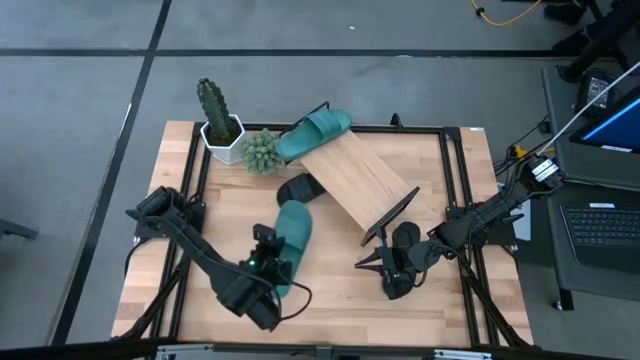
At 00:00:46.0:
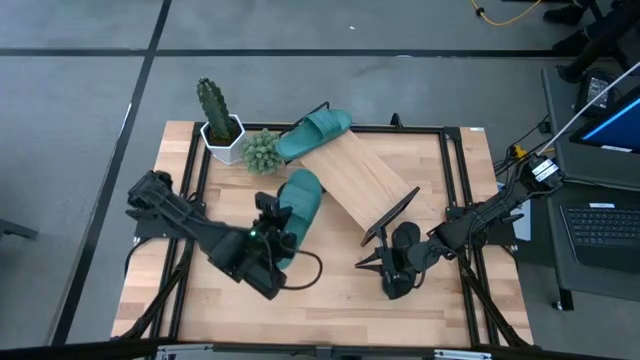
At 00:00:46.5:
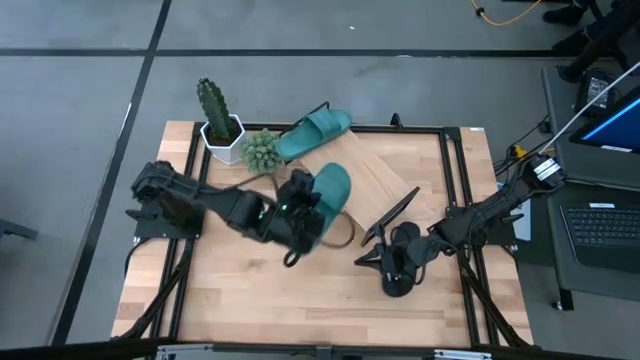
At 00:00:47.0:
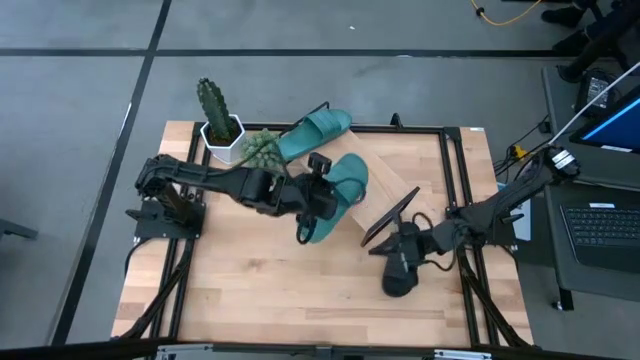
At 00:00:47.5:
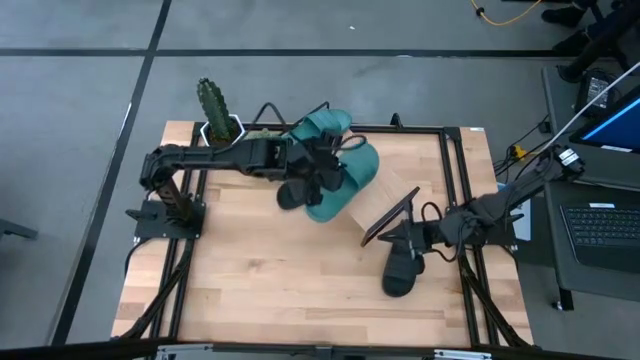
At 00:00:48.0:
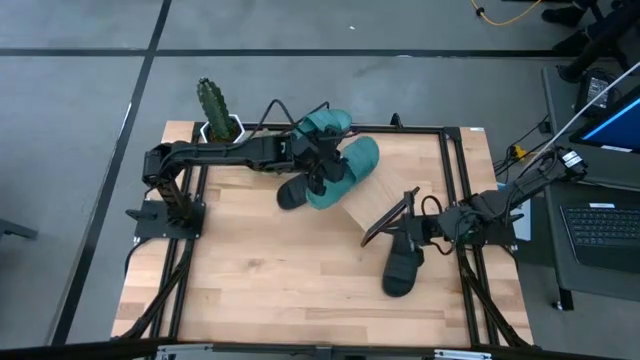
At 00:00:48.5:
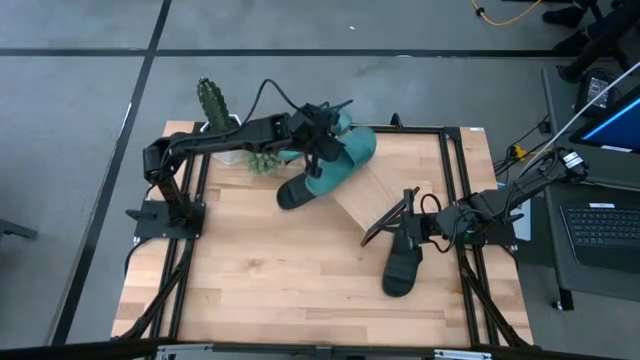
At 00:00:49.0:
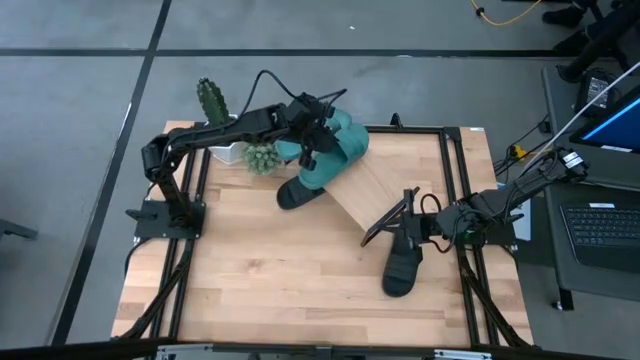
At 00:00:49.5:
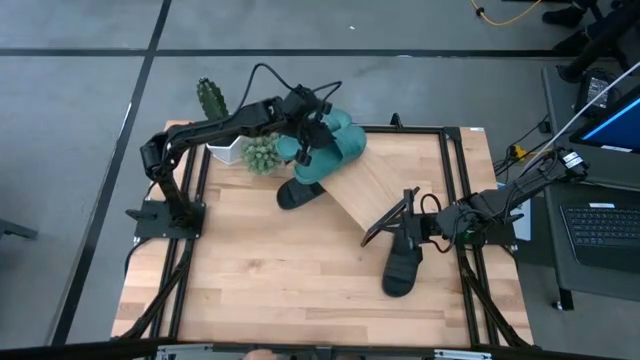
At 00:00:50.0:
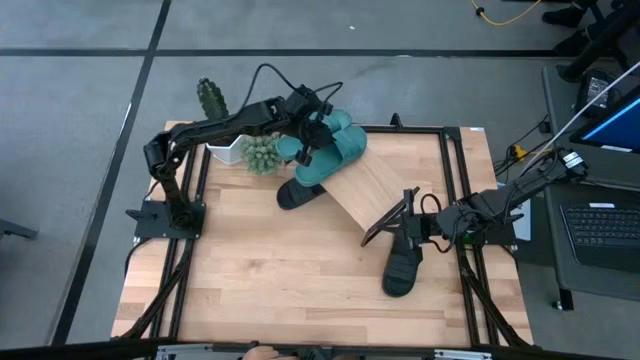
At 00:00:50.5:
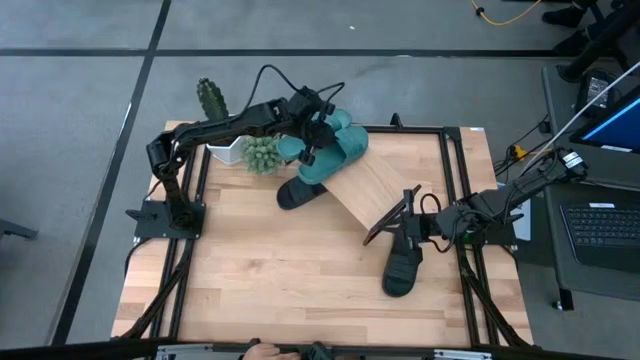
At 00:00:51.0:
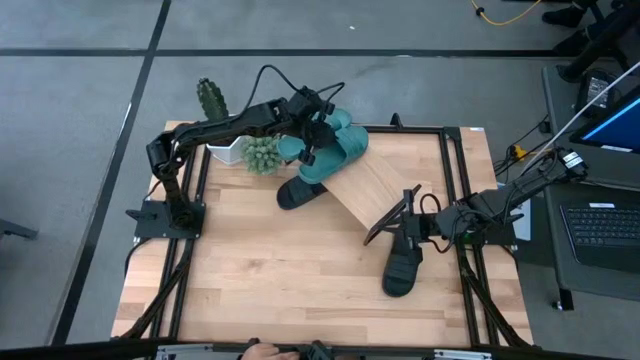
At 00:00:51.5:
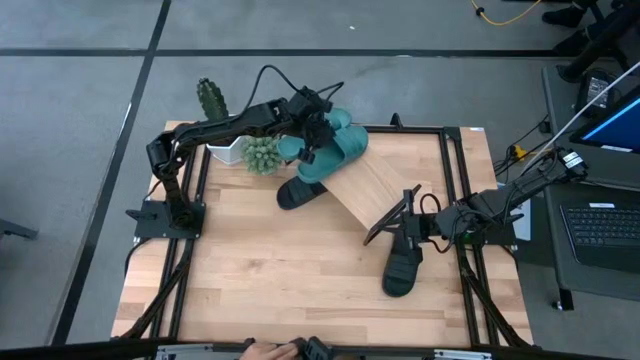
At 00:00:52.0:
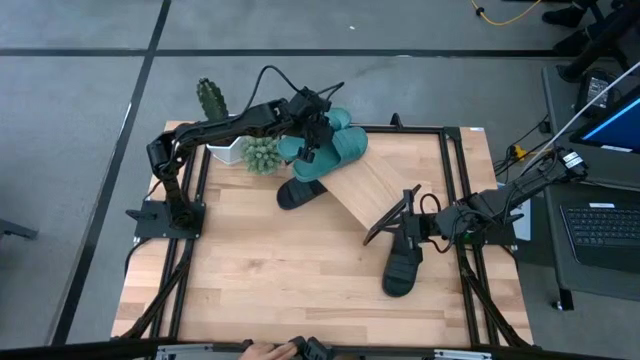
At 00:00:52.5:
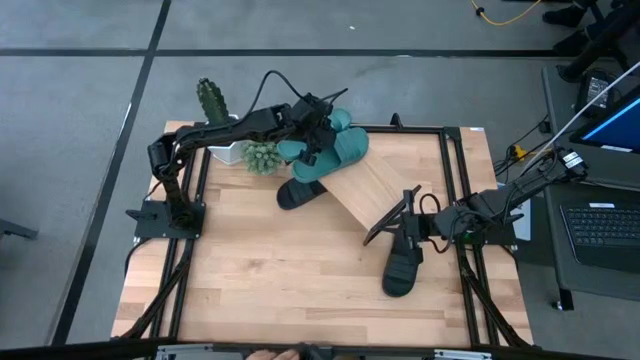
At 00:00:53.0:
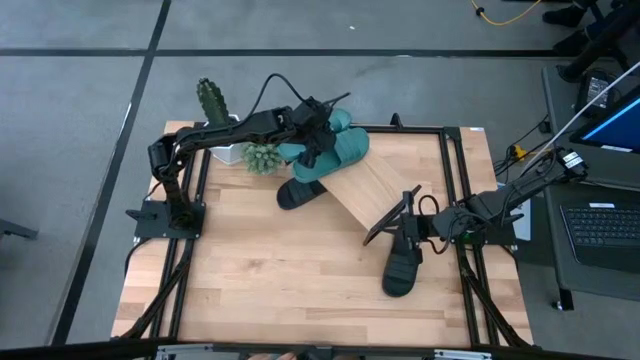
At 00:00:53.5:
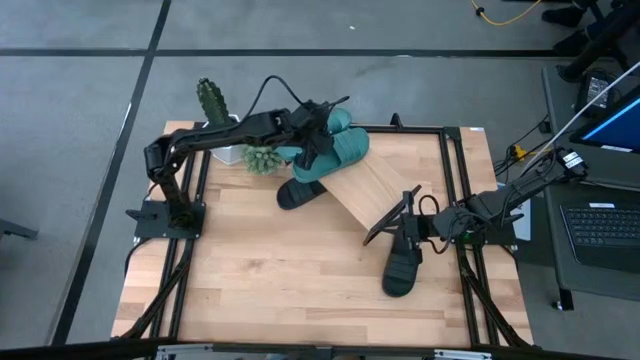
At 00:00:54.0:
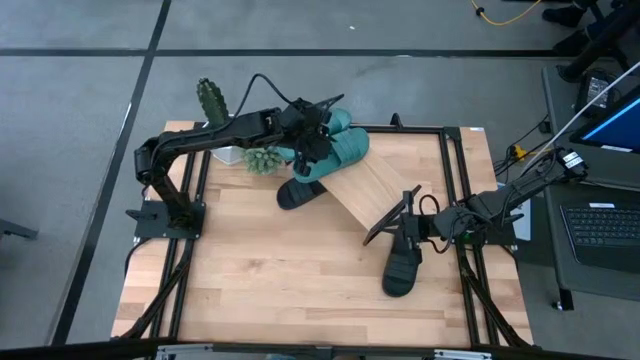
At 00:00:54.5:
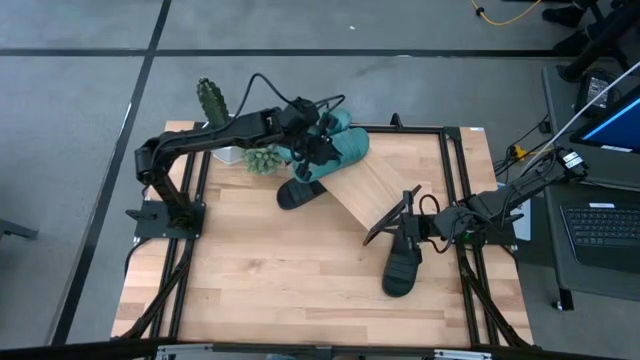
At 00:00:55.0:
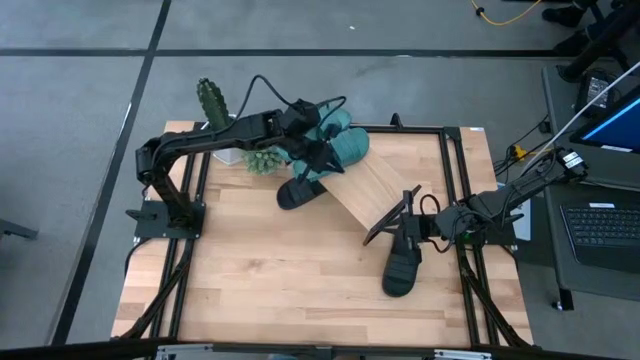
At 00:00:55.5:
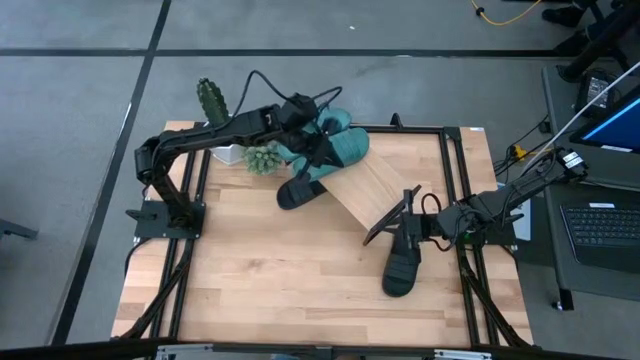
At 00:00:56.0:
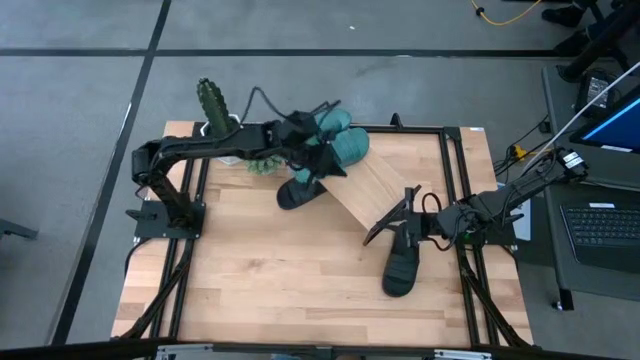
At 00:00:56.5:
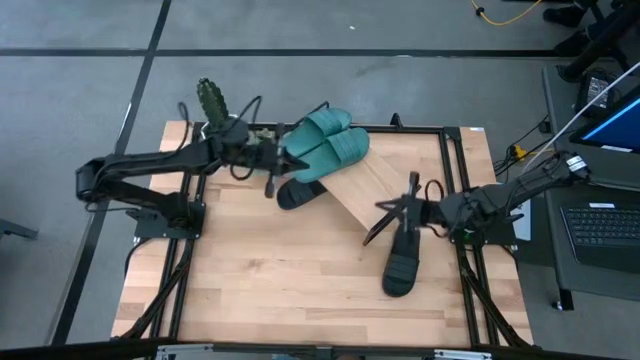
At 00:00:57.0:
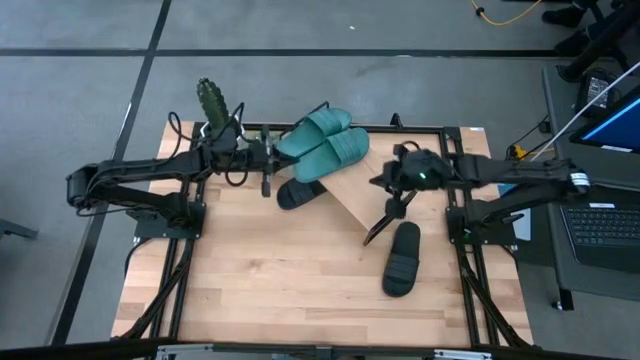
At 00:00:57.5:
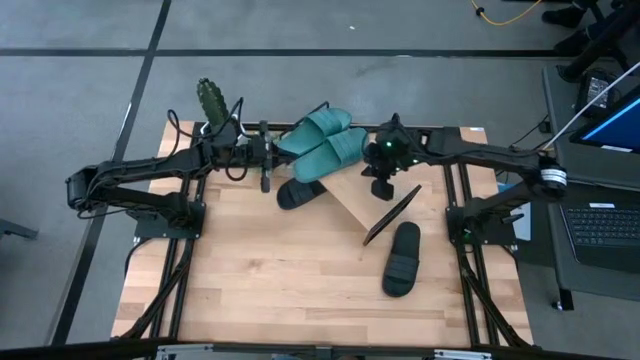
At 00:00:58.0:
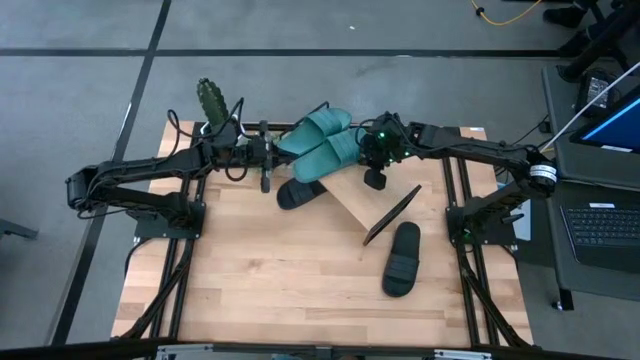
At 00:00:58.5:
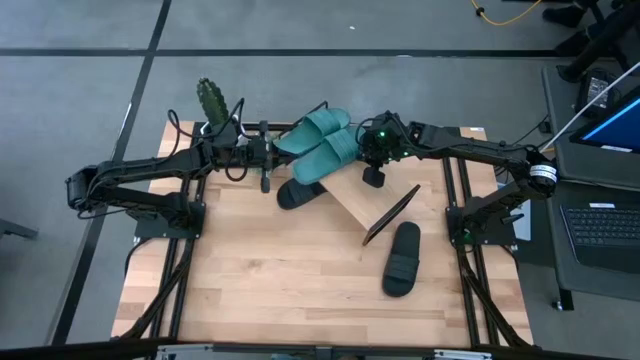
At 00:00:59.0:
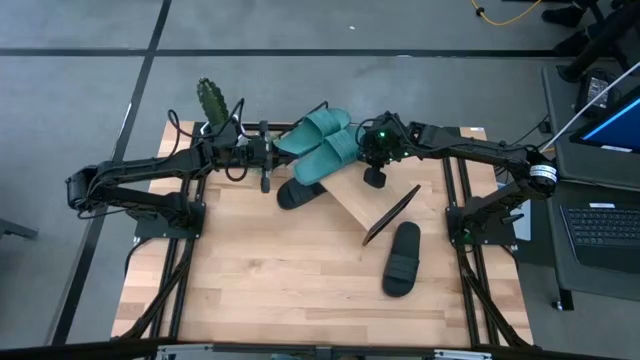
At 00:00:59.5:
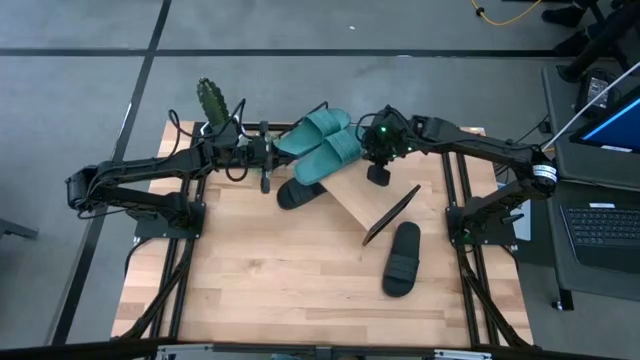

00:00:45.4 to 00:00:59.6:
Task: Pick and place slides into the shelf
Put the green slides on the shelf

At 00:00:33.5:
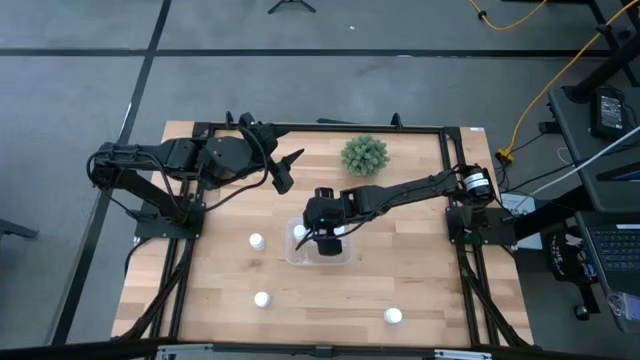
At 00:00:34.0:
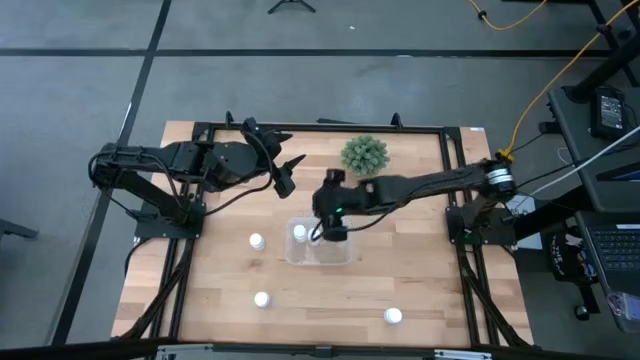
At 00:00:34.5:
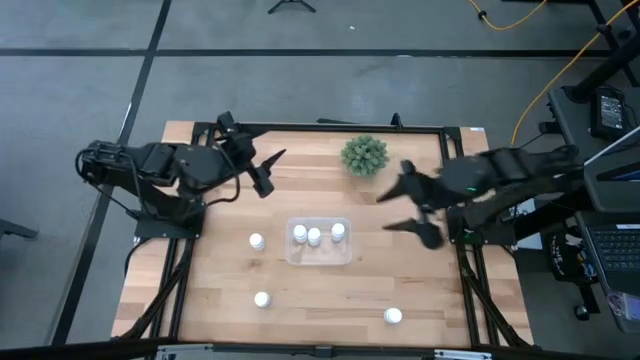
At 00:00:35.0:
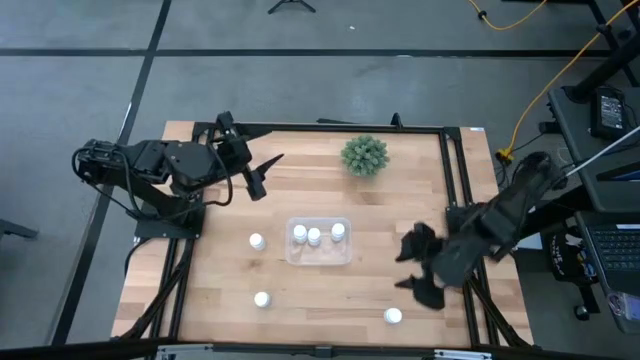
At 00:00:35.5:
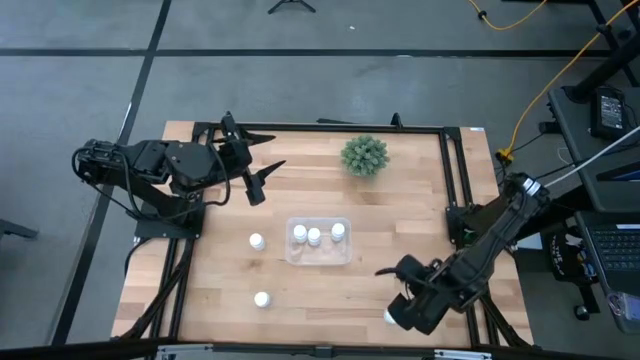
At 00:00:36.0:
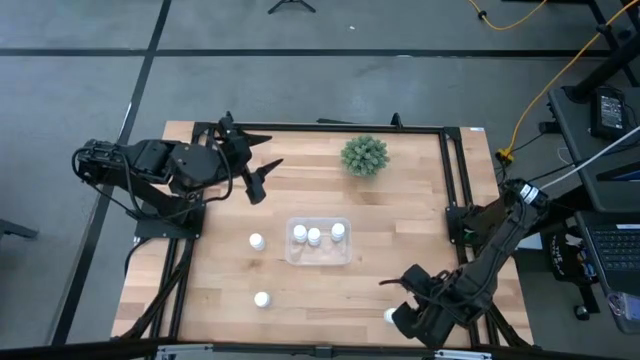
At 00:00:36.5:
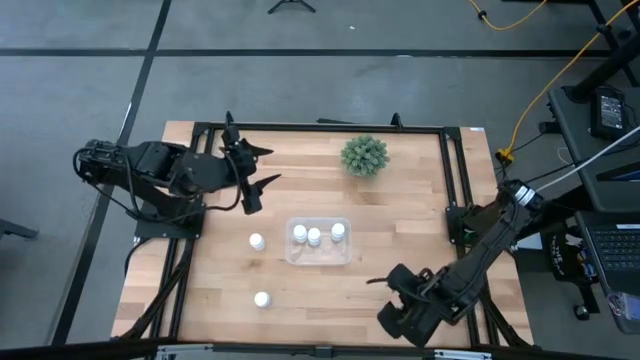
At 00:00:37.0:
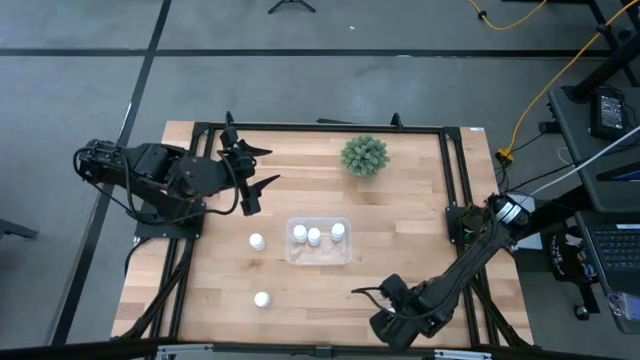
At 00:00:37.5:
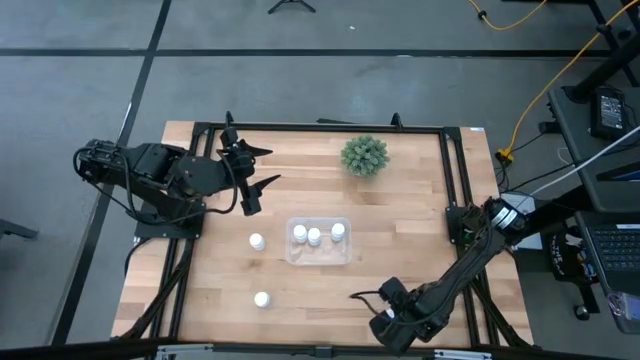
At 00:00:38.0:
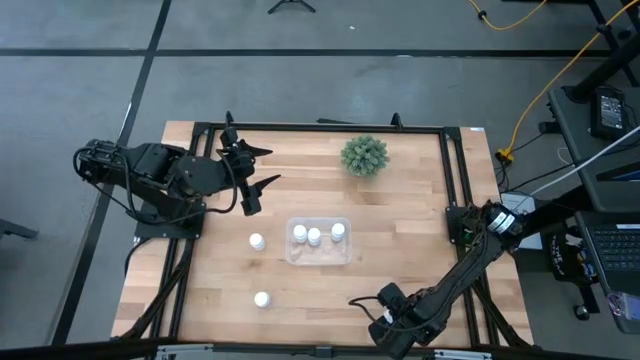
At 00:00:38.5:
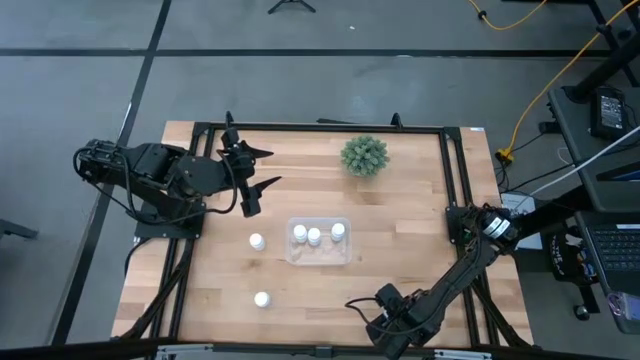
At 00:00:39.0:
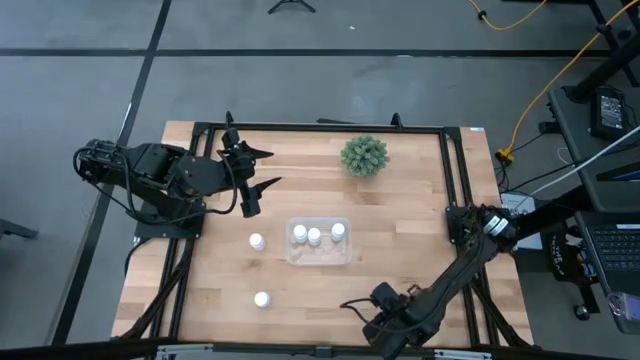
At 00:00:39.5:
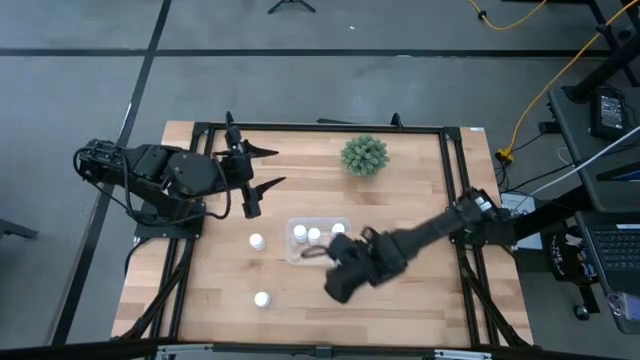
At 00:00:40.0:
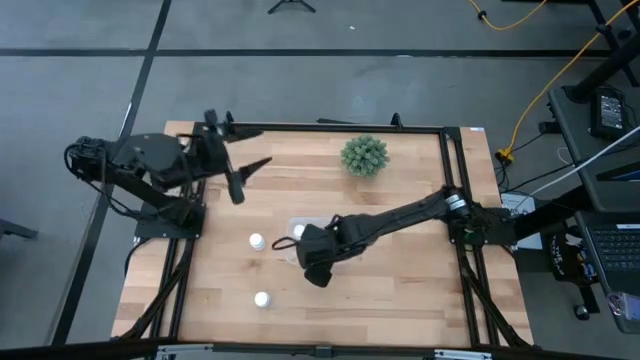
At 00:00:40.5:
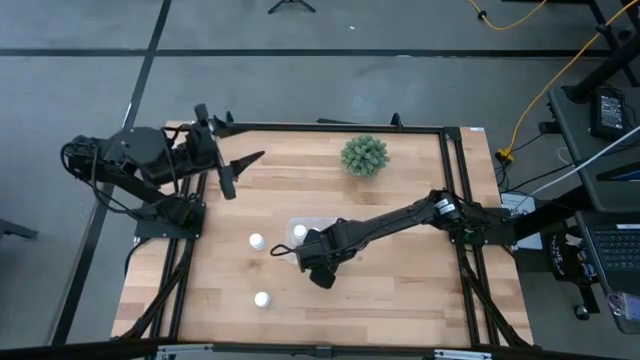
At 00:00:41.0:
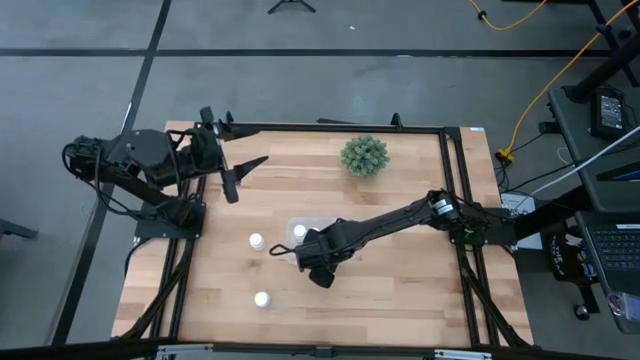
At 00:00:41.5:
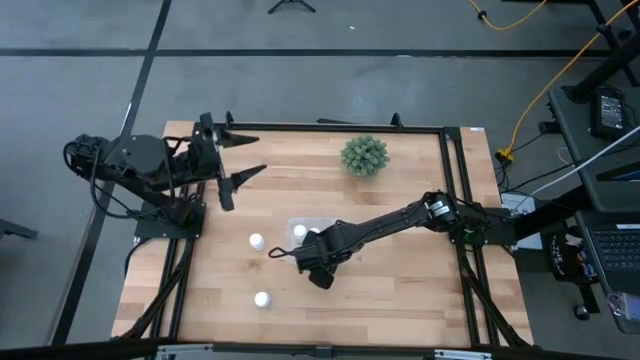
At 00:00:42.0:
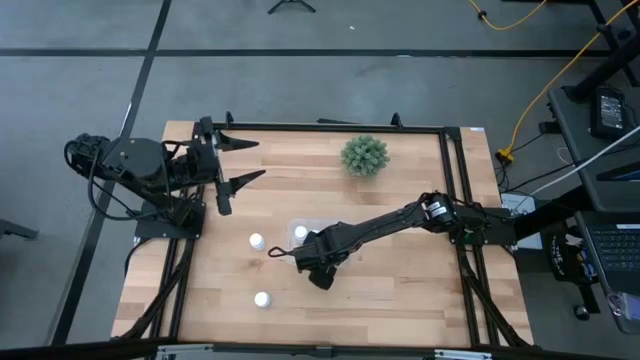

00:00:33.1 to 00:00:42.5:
Task: Pick and place pill bottles into a basket
Put the white medicine bottle into the transparent bin
